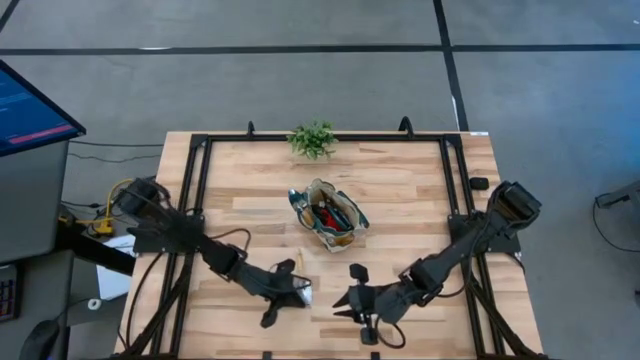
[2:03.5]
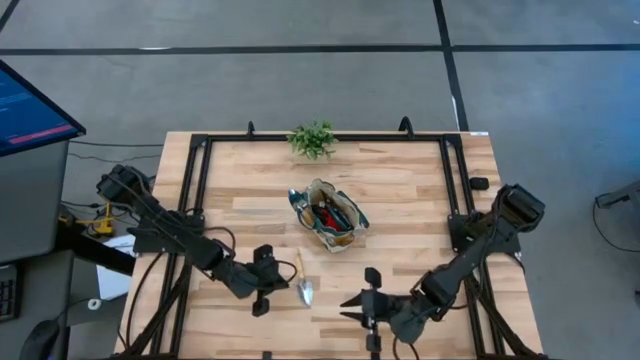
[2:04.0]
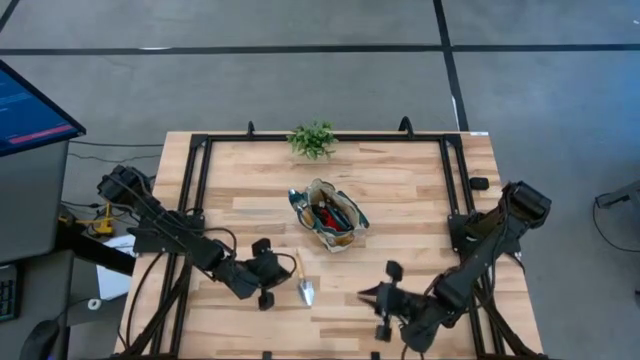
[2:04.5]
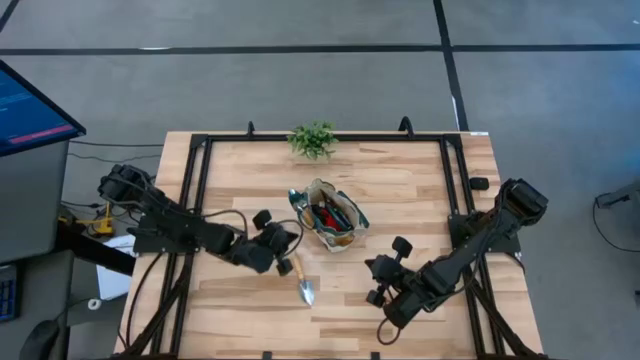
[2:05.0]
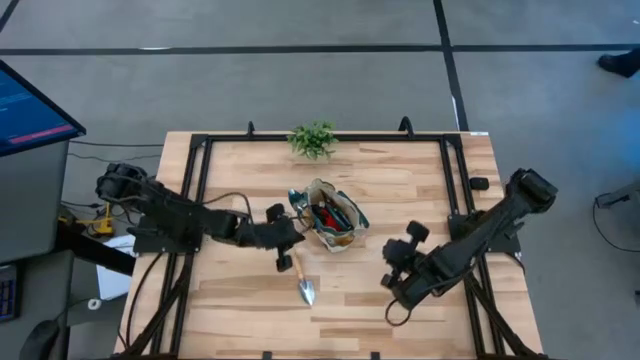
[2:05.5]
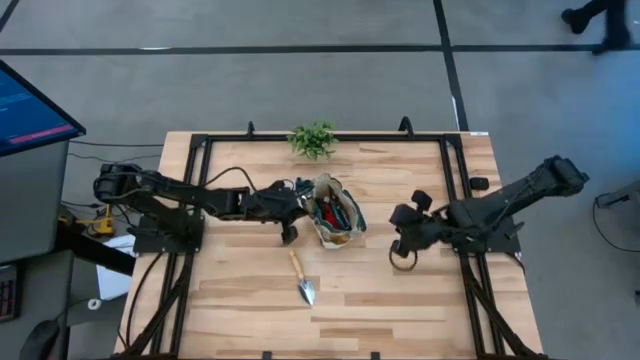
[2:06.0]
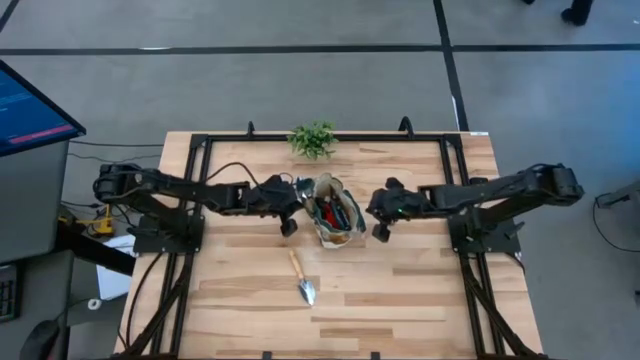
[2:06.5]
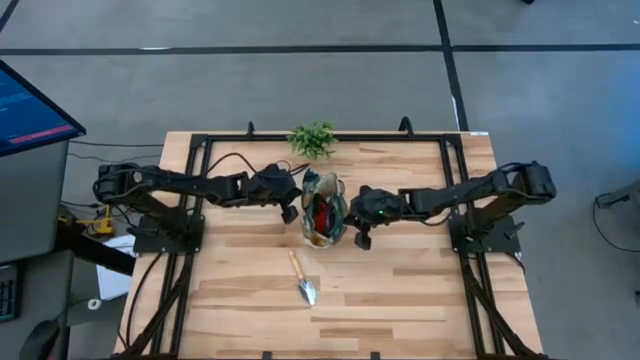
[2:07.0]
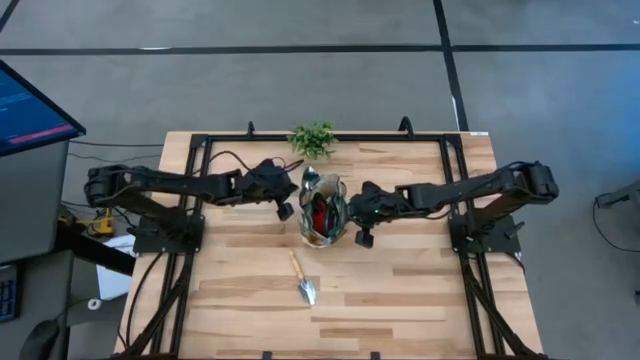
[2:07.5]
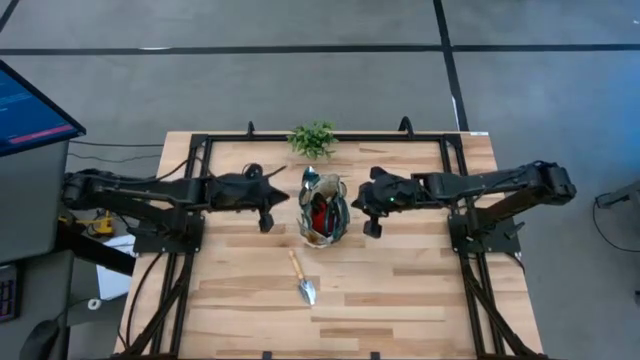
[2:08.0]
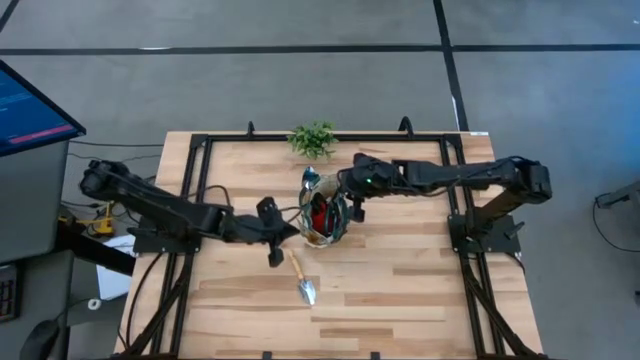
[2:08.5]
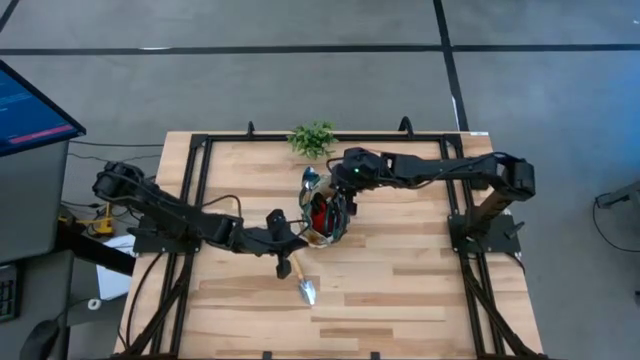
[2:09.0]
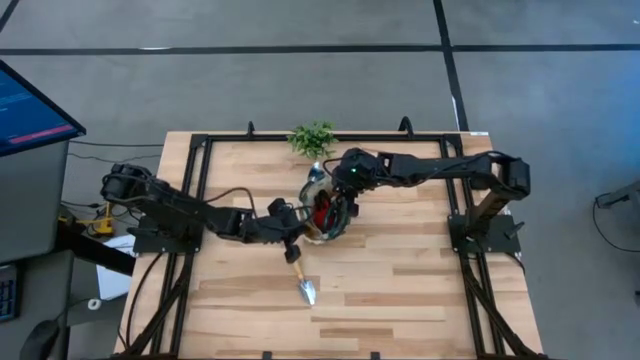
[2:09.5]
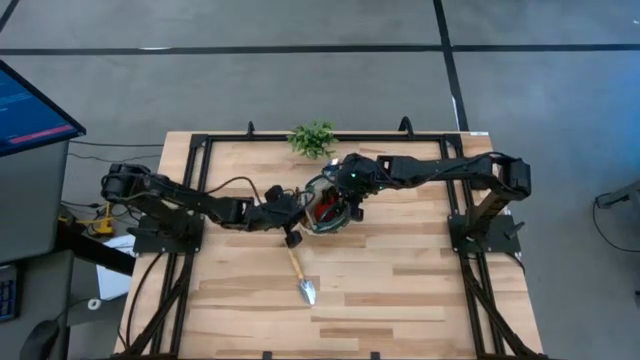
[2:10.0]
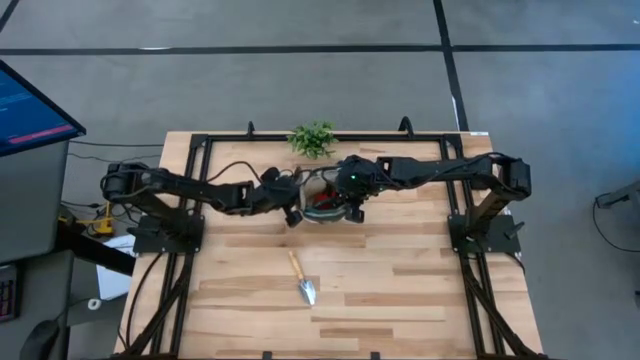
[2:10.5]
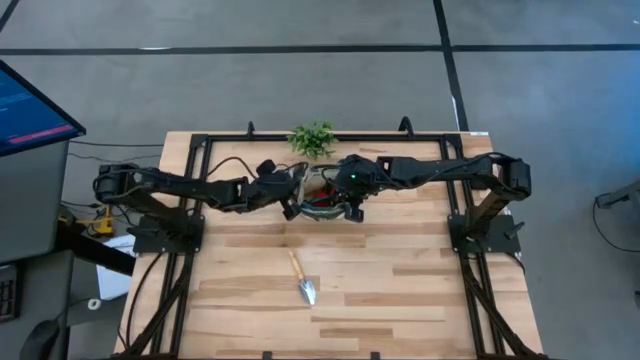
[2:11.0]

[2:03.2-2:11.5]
Task: Pick & Place Garden tools in Gardening bag
Adjust the gardening bag

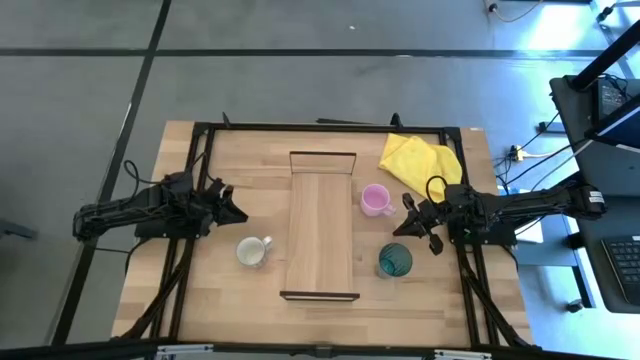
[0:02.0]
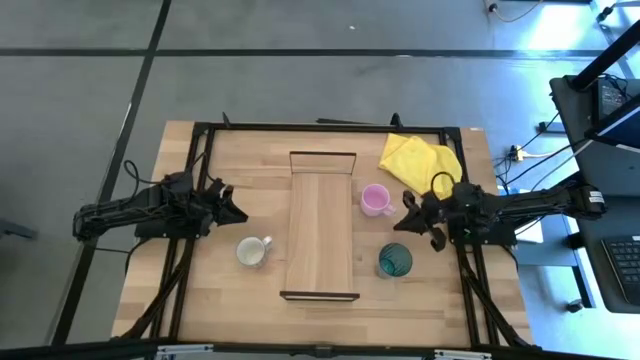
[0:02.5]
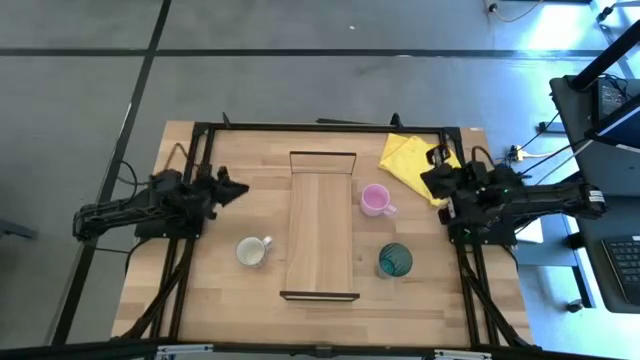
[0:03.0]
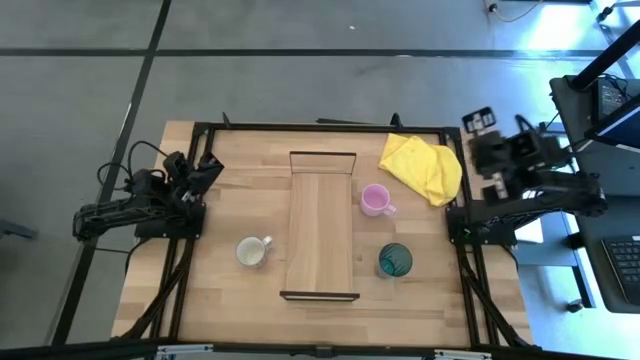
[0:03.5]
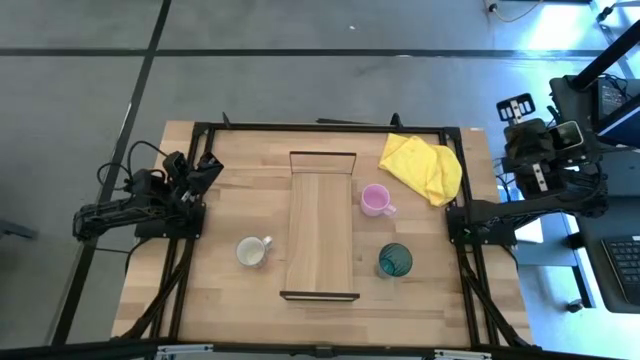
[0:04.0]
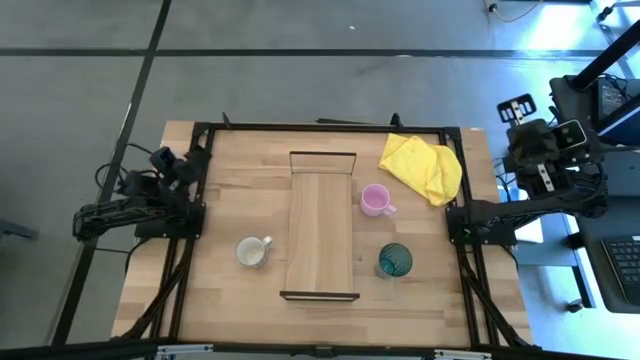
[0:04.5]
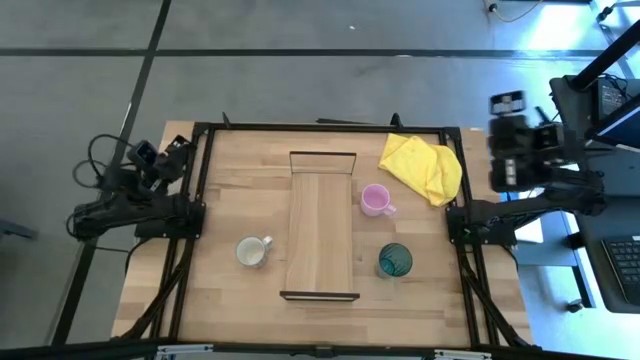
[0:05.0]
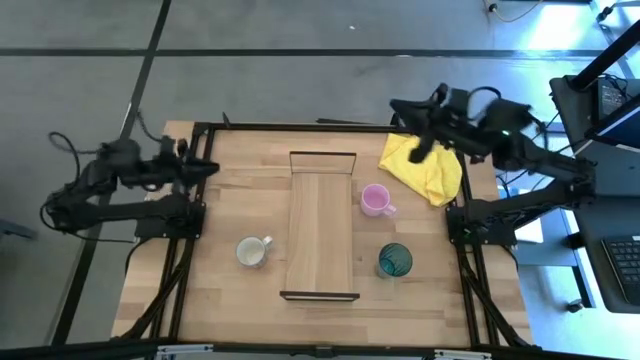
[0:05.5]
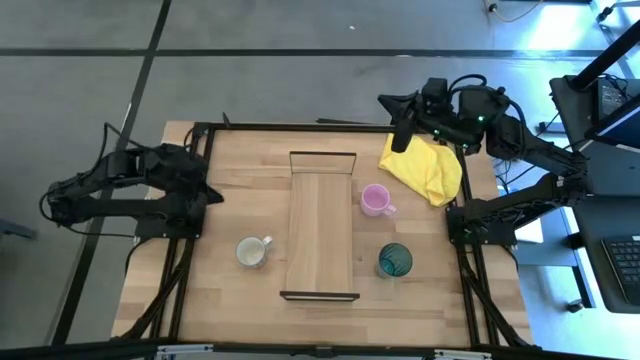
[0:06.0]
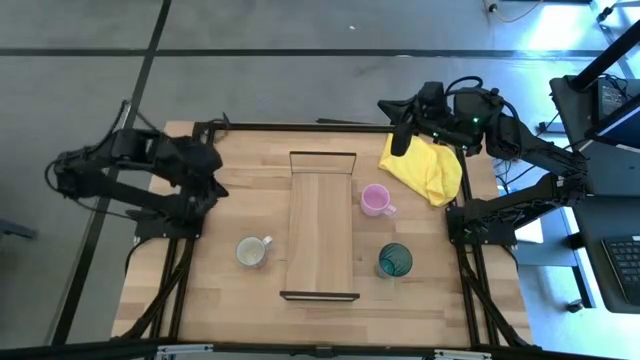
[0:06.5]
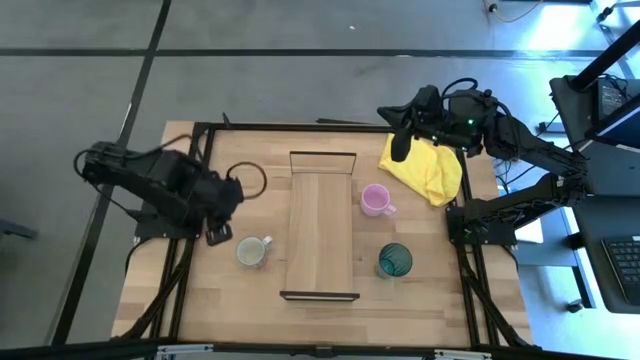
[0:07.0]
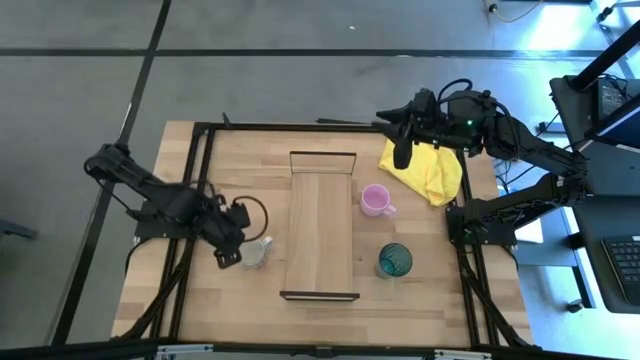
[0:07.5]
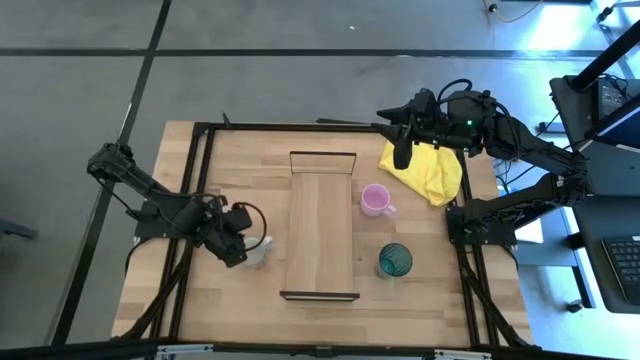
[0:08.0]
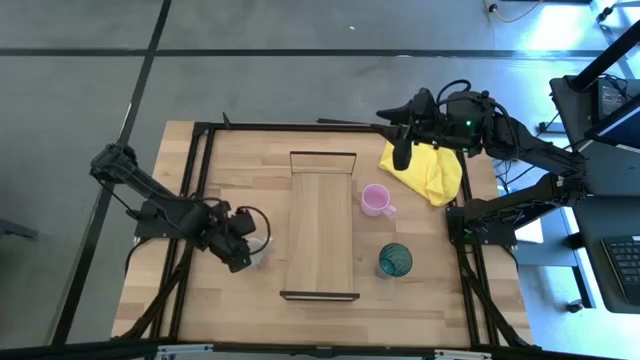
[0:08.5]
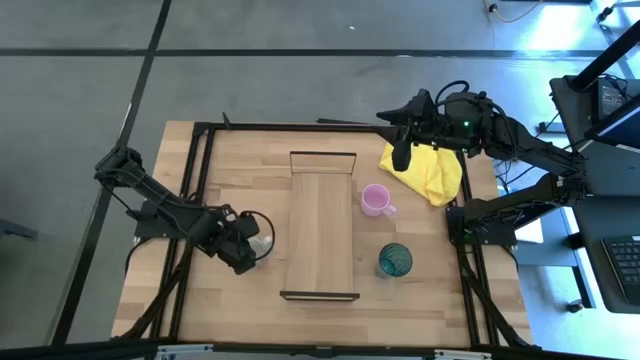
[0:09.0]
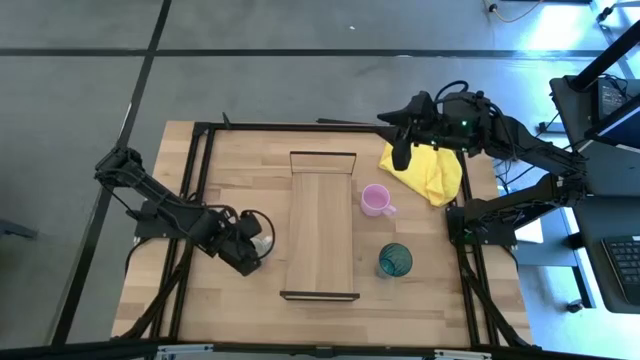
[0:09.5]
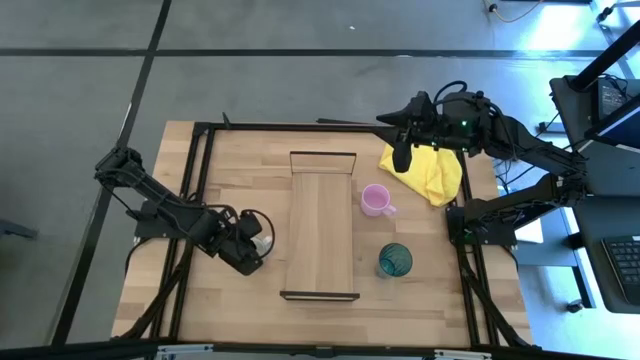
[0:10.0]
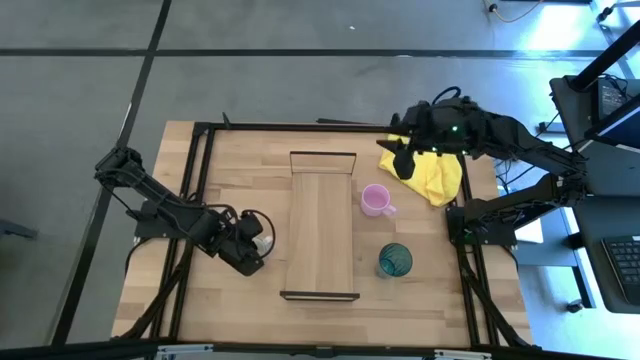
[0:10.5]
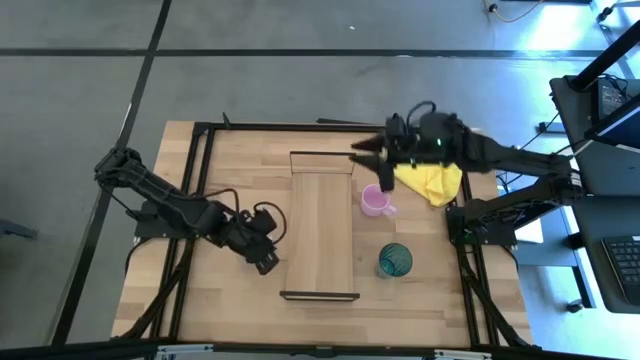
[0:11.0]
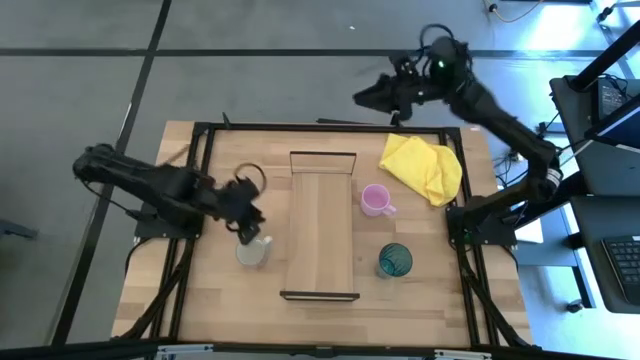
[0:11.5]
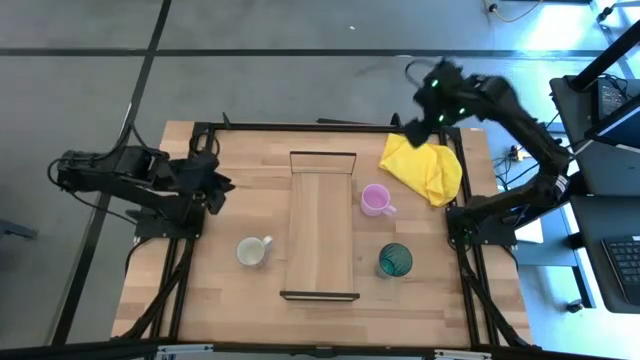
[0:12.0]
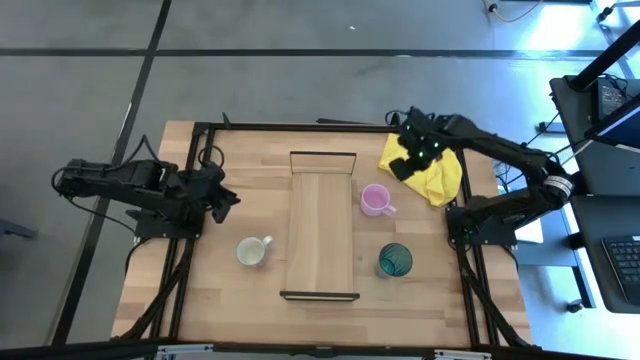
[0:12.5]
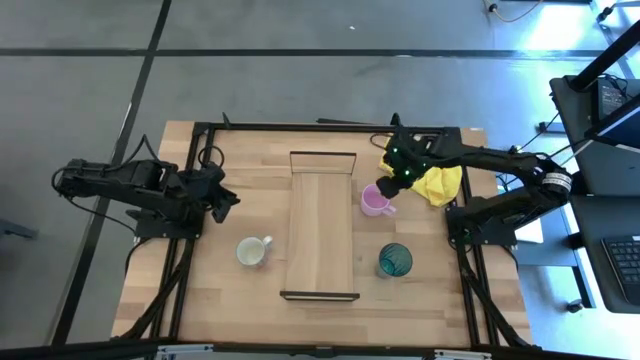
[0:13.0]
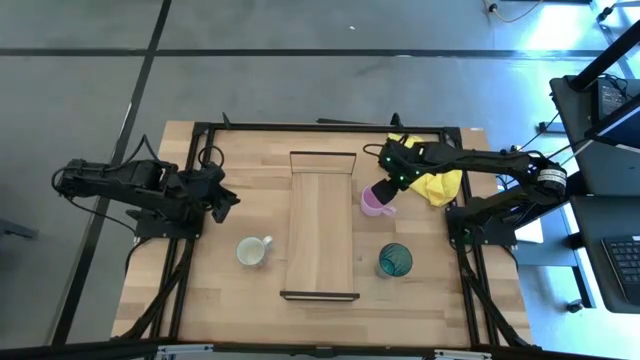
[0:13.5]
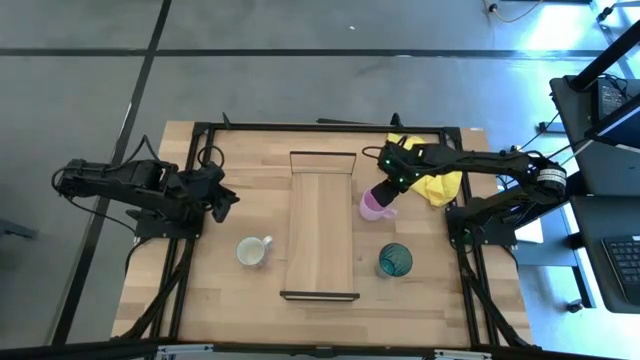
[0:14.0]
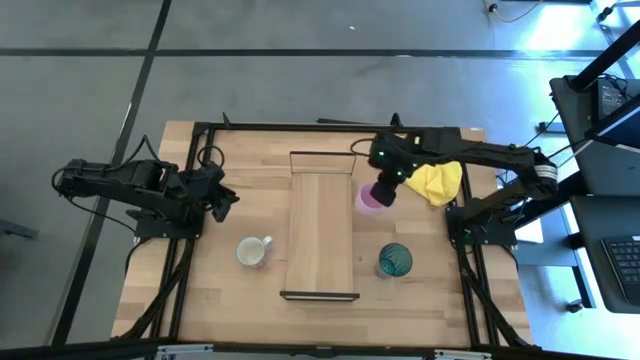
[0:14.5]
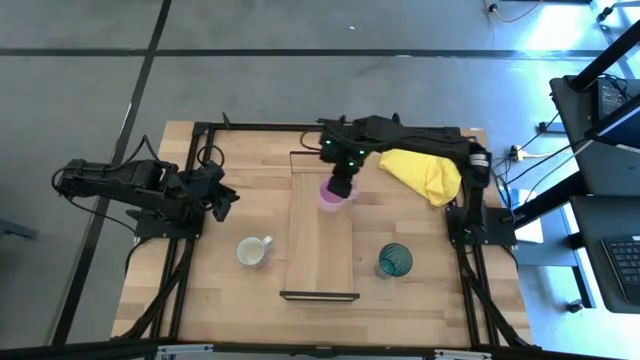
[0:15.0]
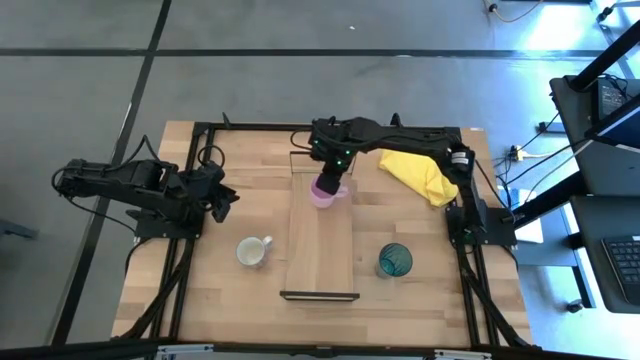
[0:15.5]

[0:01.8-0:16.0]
Task: Stack small to large cups/mugs on shelf
Put the pink mug on the shelf
